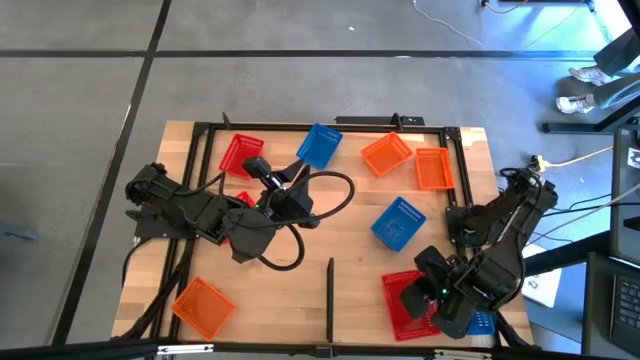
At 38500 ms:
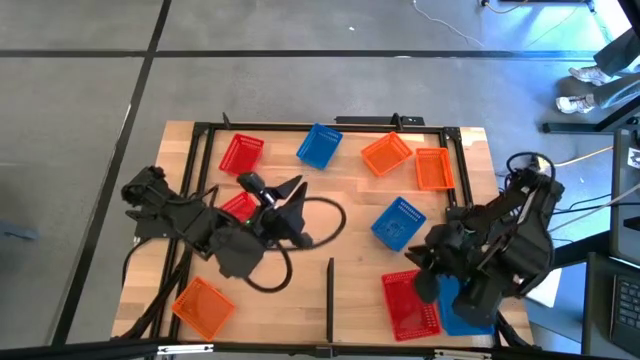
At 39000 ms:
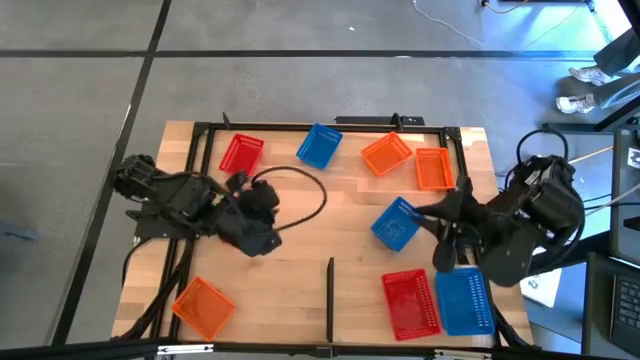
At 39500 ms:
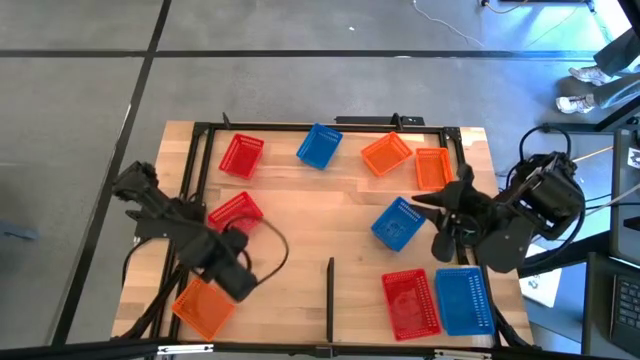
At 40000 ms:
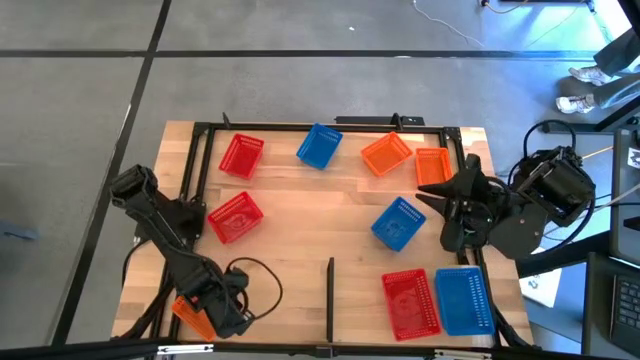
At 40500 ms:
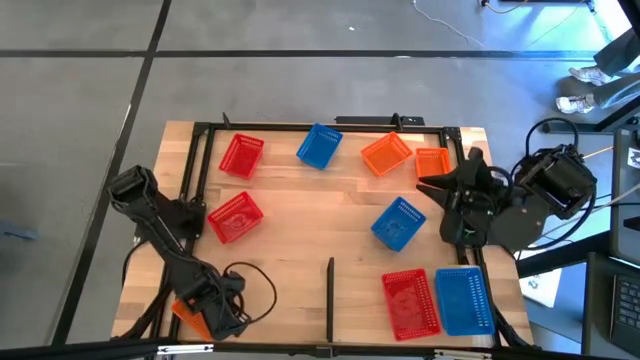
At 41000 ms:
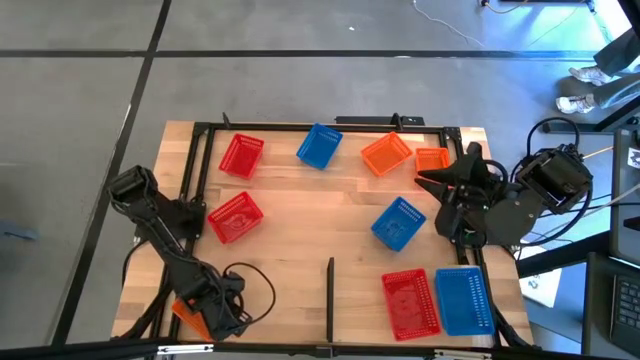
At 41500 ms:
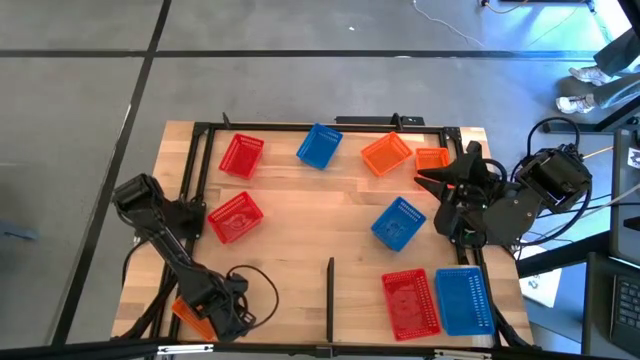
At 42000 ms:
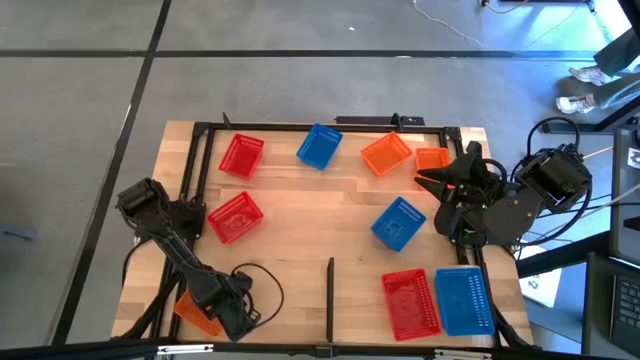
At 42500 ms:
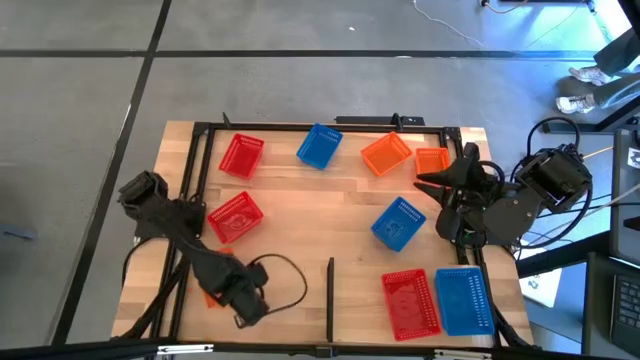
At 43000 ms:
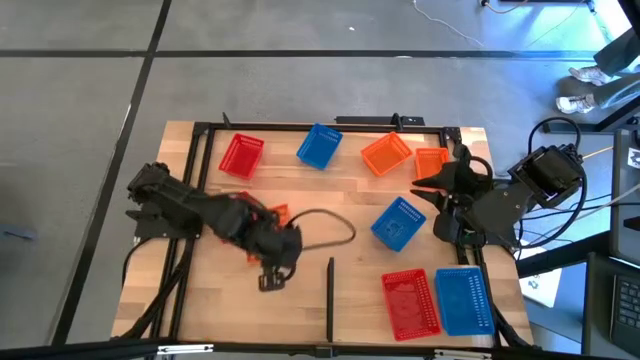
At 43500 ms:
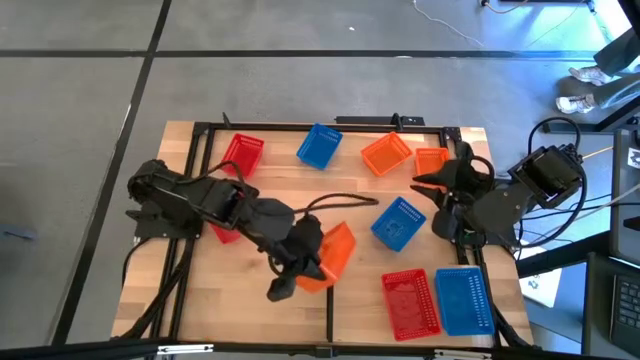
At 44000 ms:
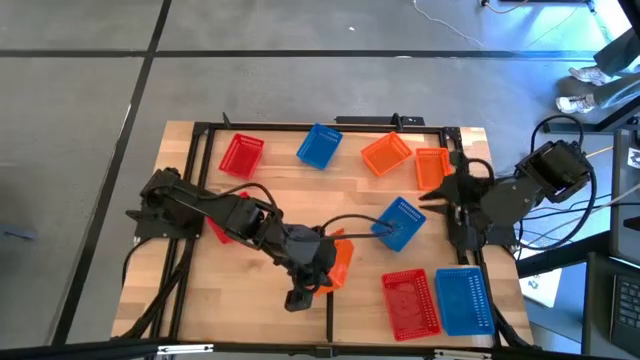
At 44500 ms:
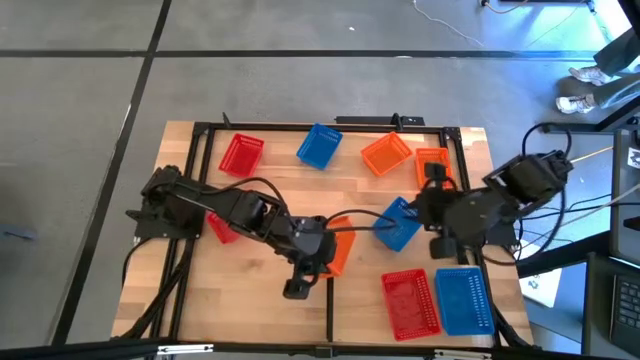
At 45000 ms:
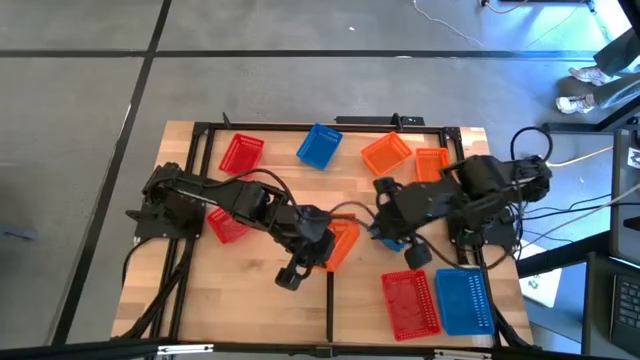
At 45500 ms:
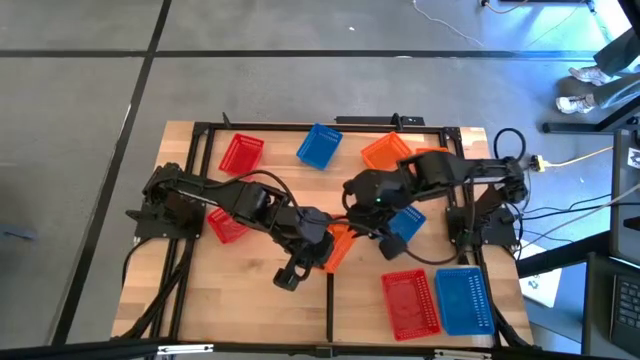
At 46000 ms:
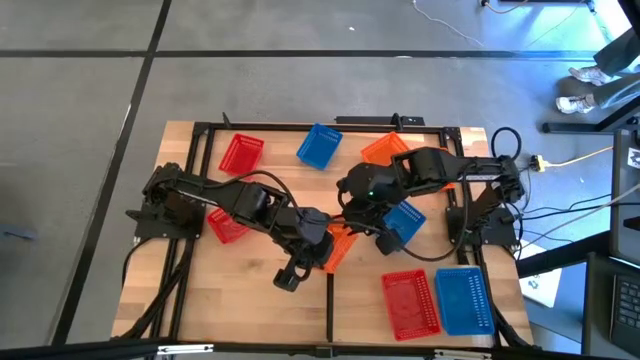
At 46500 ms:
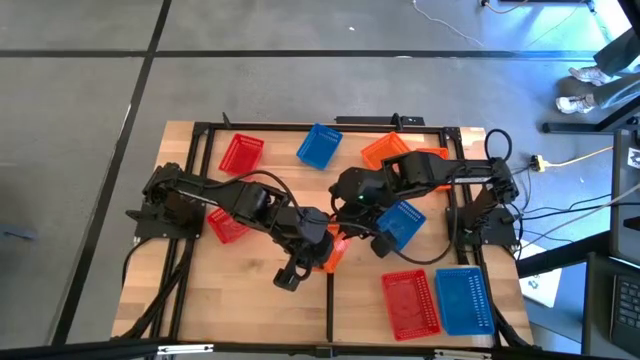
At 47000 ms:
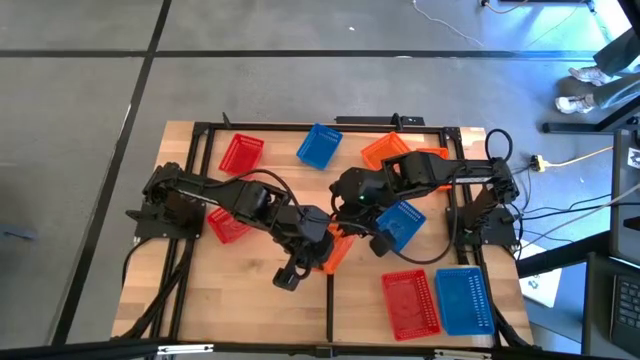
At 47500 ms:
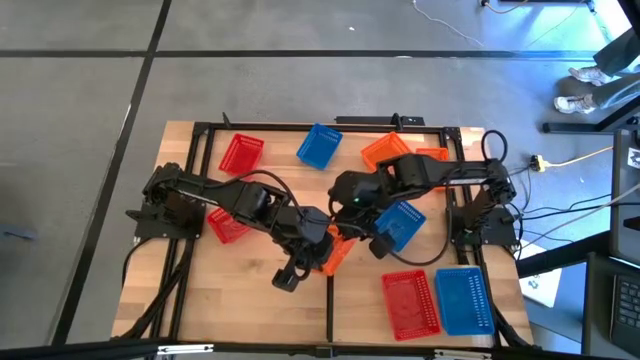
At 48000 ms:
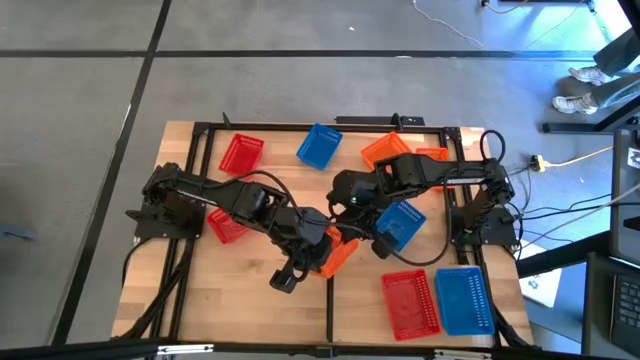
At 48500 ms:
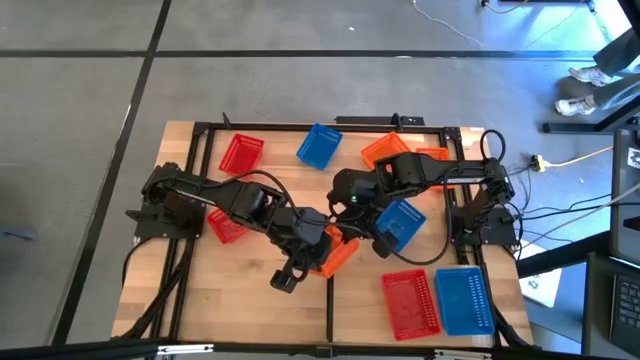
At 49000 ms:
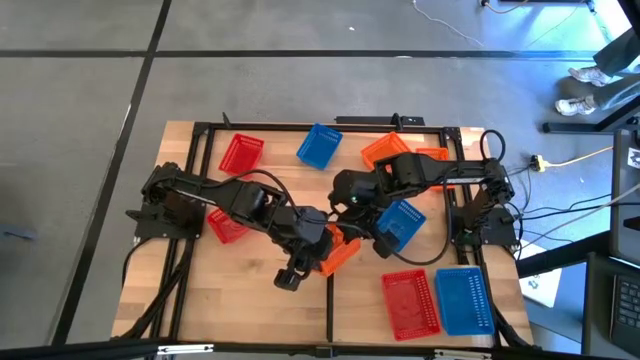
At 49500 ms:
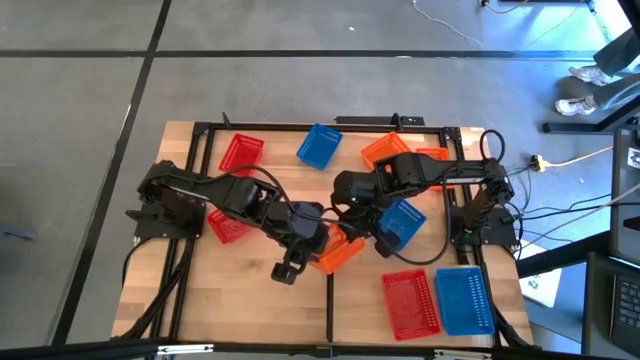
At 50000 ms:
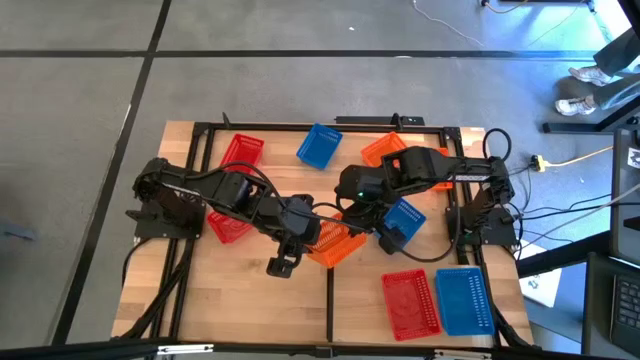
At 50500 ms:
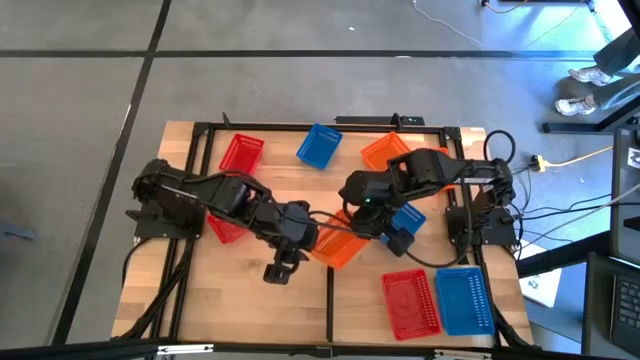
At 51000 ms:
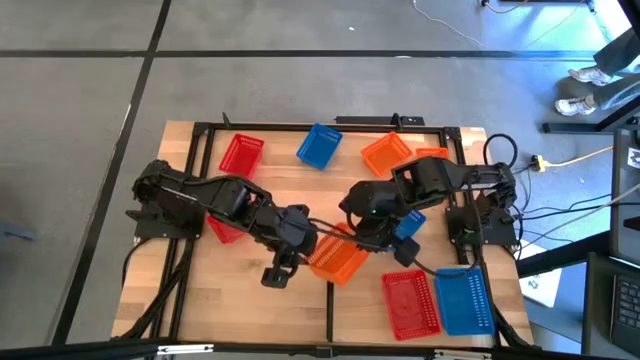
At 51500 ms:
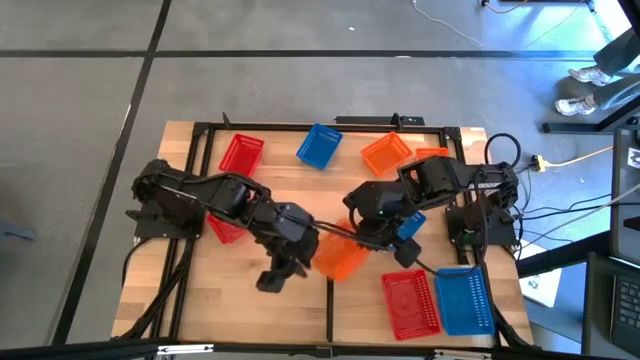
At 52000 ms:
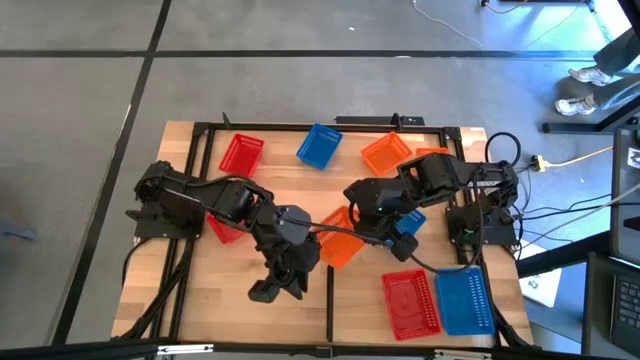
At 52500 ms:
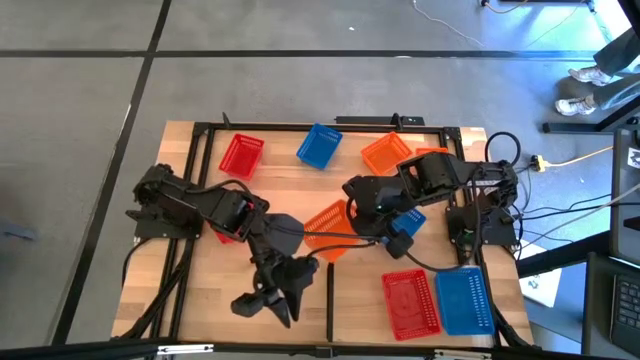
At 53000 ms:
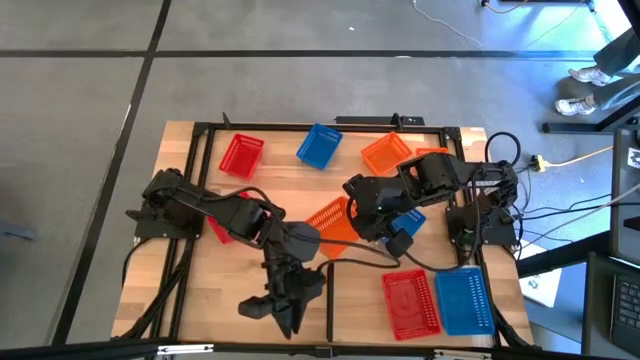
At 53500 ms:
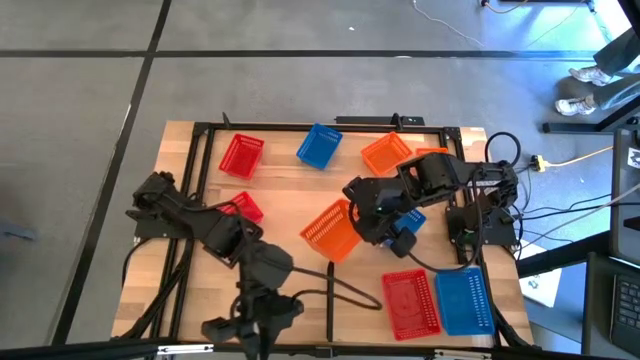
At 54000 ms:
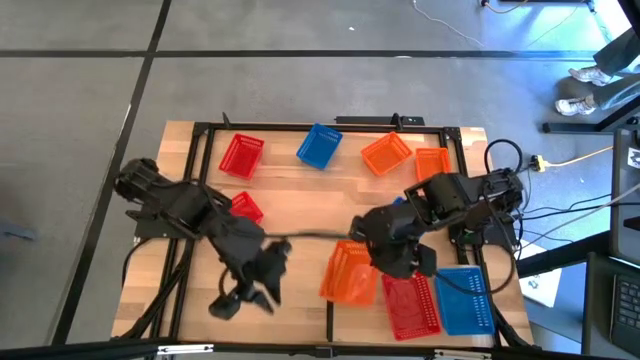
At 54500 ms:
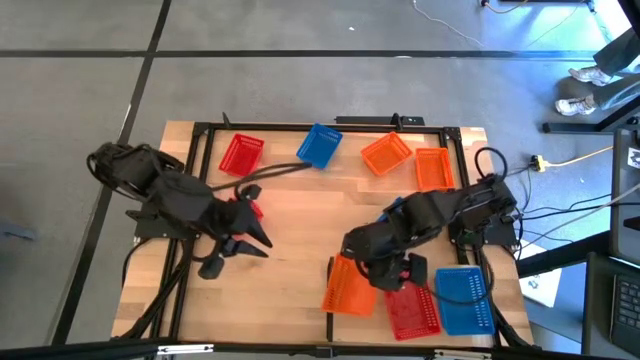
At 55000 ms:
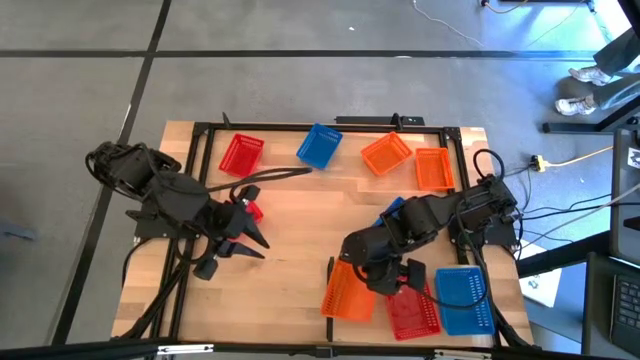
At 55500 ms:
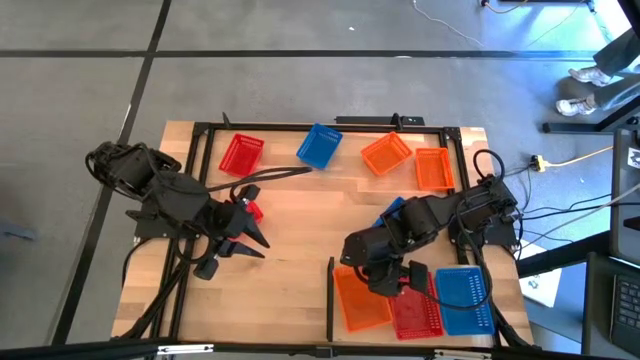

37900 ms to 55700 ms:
Task: Stack baskets on shelf by color
Put the bottom orange basket on the shelf

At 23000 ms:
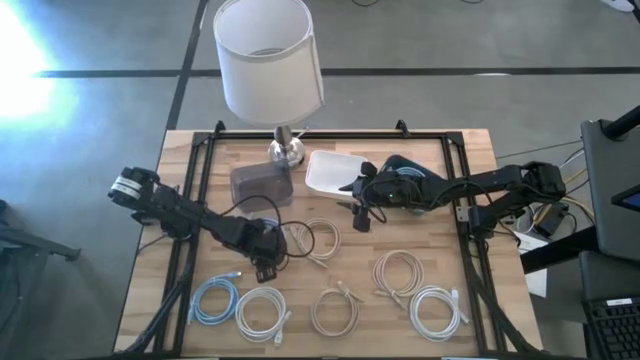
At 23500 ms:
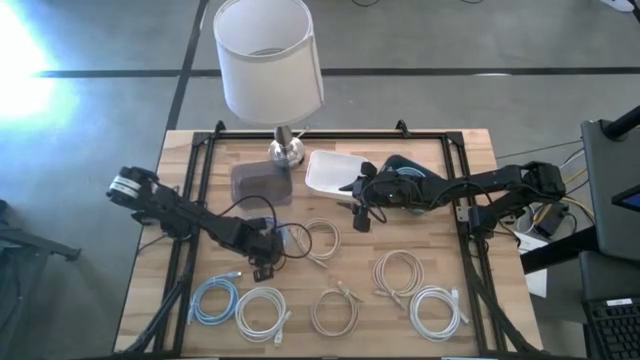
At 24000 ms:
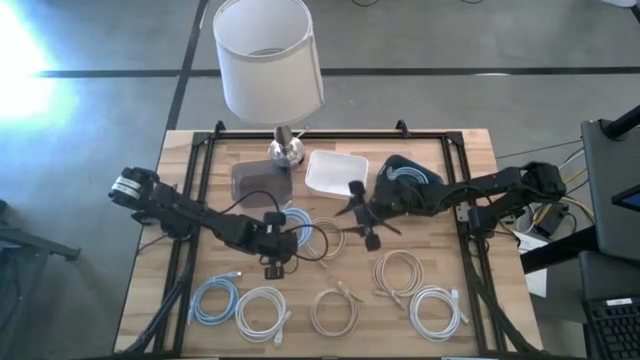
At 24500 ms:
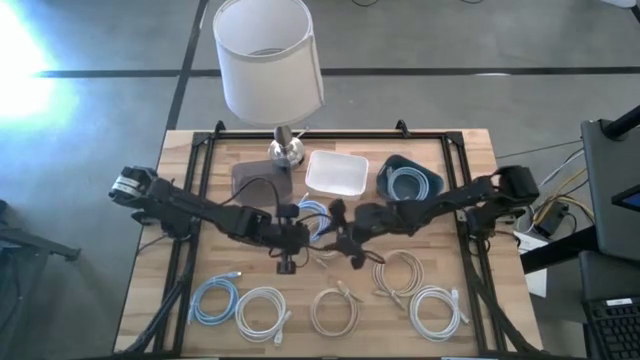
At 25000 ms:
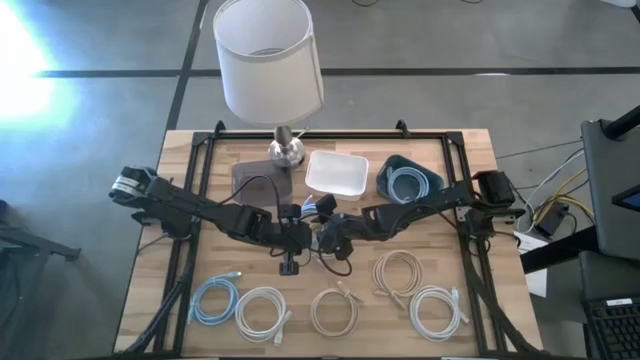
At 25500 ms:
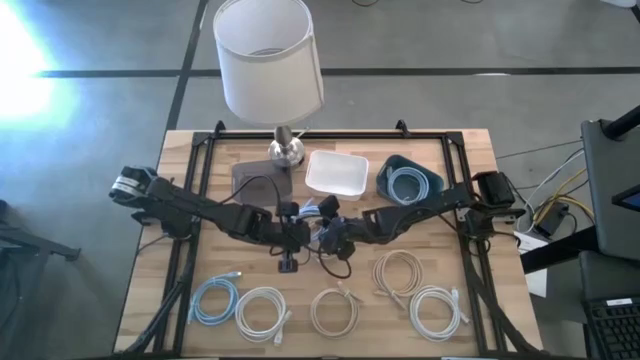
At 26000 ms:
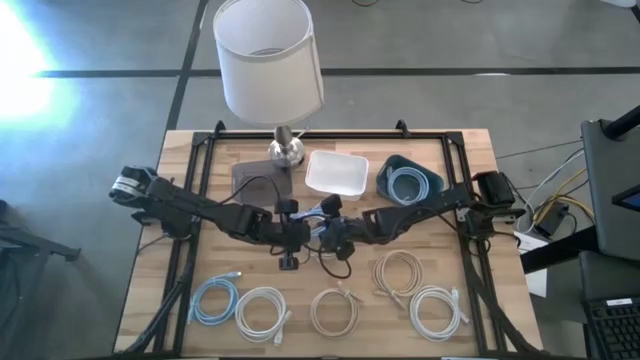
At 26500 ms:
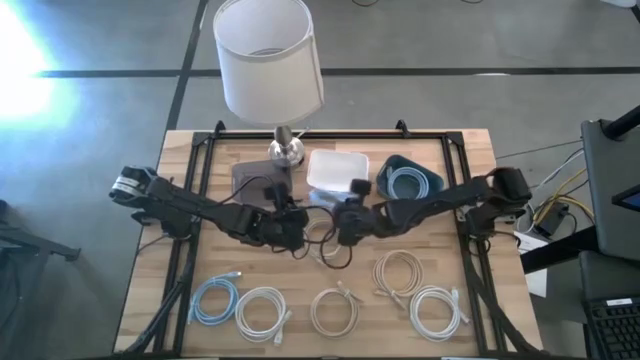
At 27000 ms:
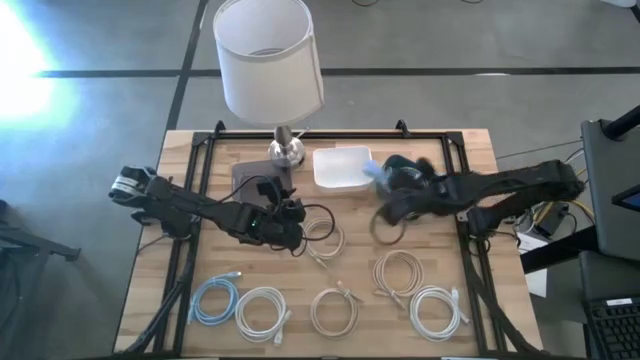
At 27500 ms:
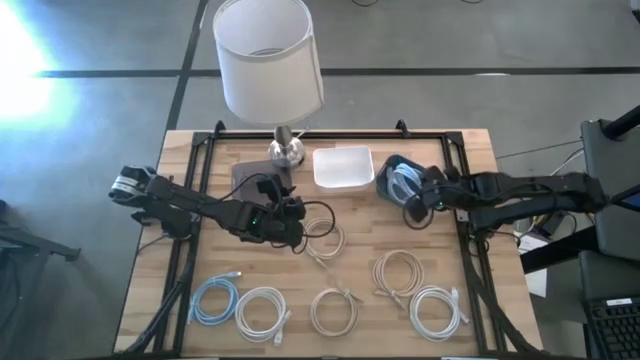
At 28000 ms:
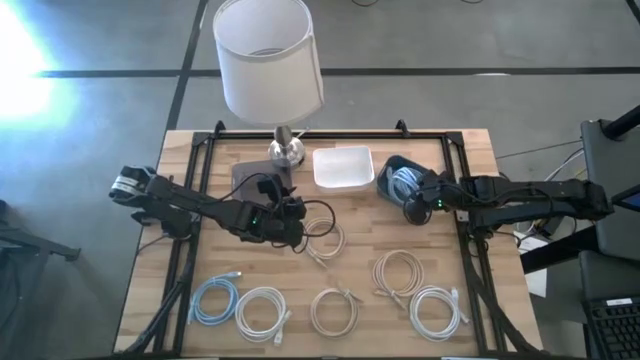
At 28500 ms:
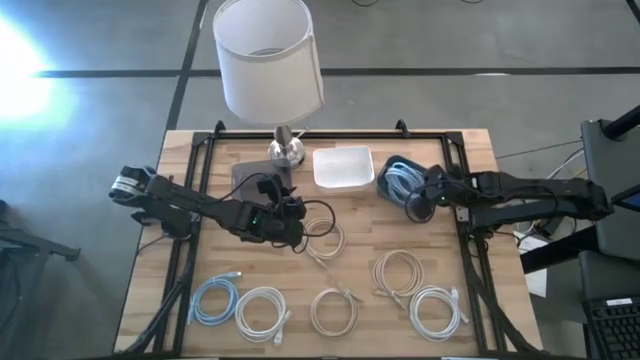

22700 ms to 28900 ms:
Task: Sort HDMI cables
Put the top blue hdmi cable into the blue bin
